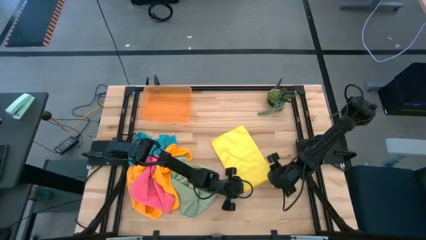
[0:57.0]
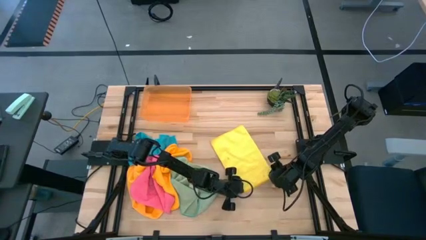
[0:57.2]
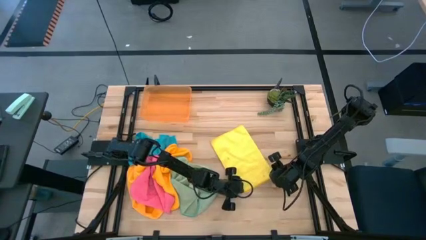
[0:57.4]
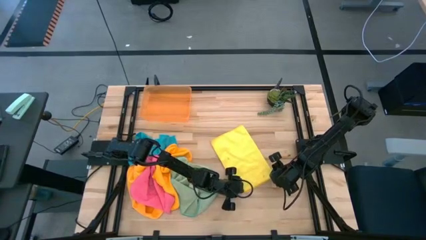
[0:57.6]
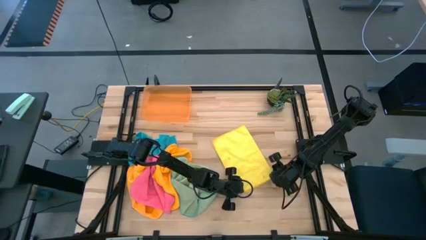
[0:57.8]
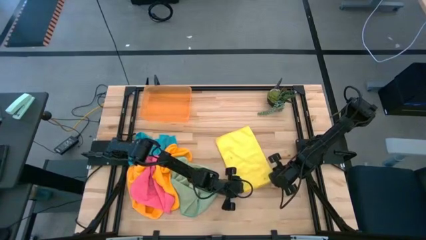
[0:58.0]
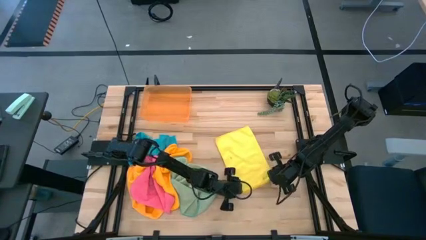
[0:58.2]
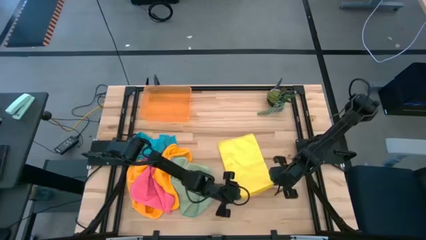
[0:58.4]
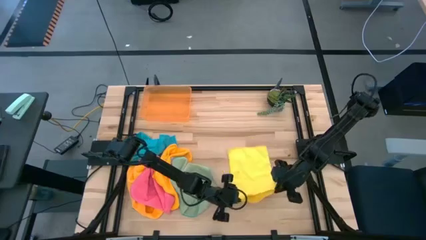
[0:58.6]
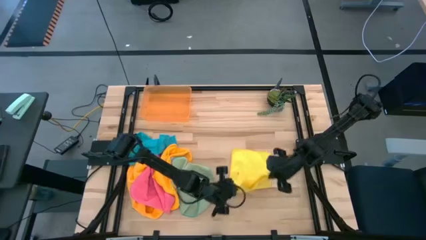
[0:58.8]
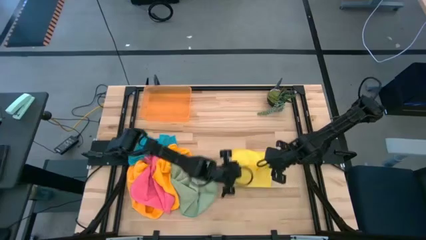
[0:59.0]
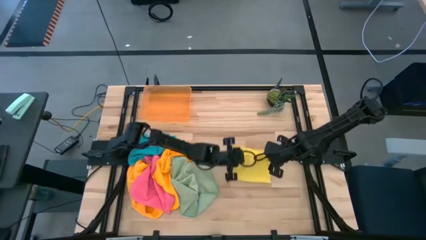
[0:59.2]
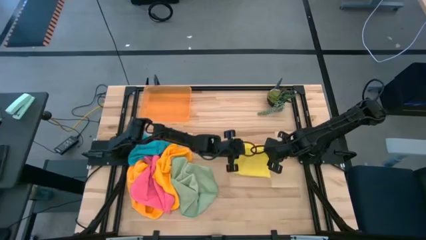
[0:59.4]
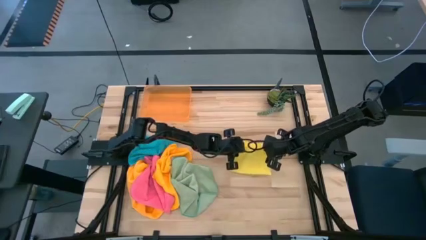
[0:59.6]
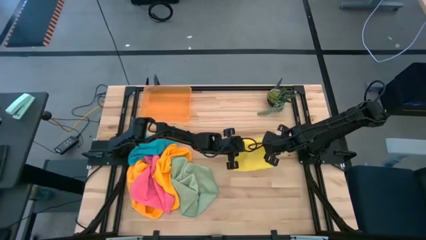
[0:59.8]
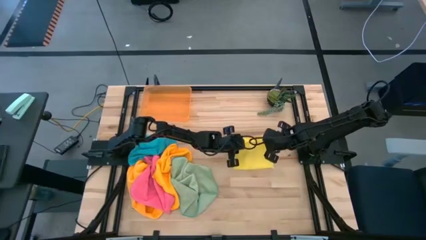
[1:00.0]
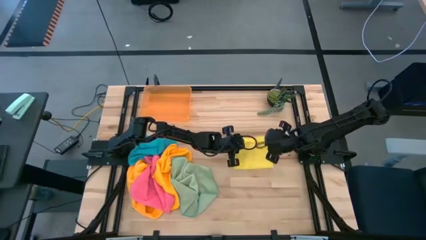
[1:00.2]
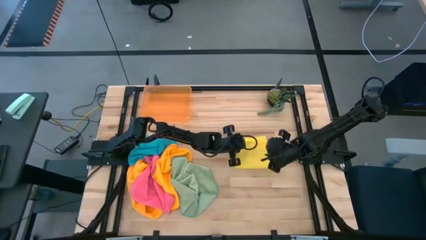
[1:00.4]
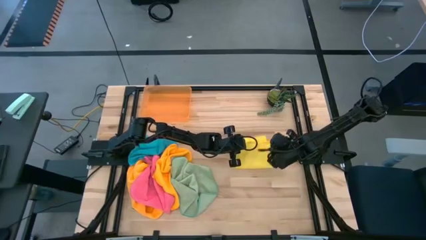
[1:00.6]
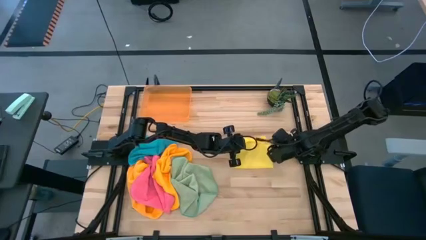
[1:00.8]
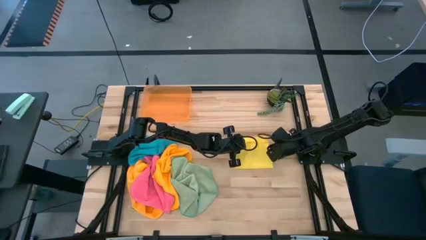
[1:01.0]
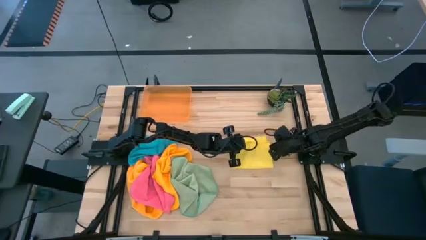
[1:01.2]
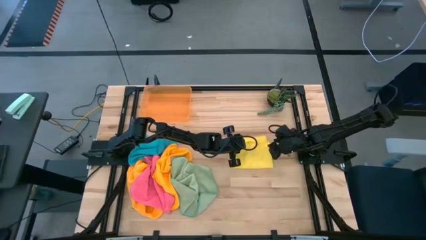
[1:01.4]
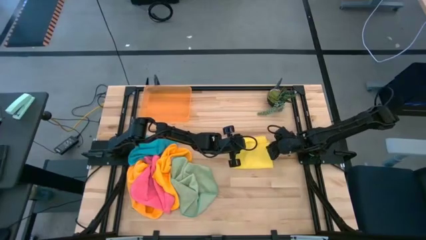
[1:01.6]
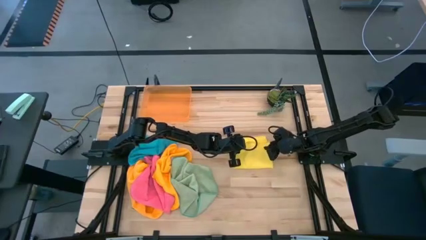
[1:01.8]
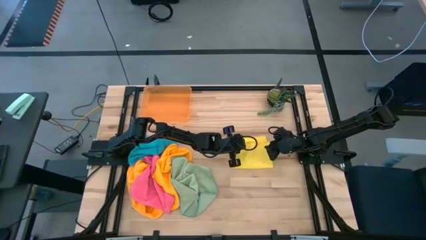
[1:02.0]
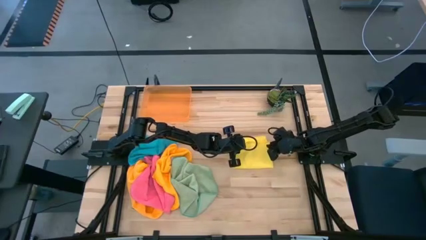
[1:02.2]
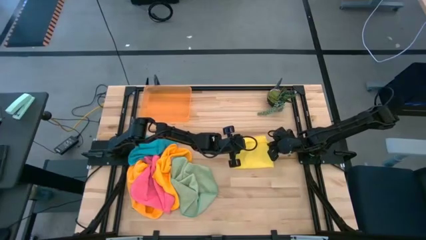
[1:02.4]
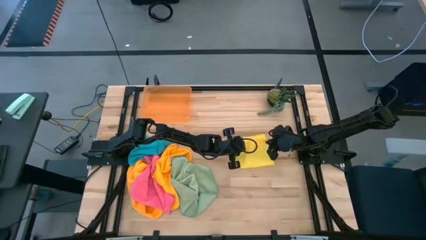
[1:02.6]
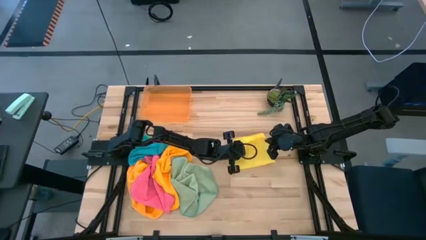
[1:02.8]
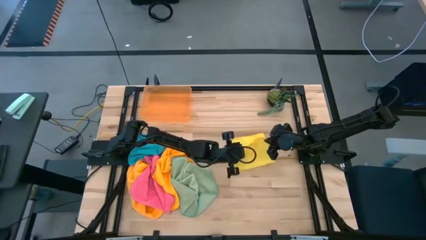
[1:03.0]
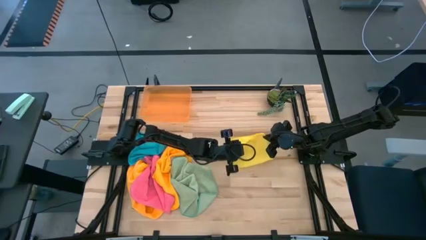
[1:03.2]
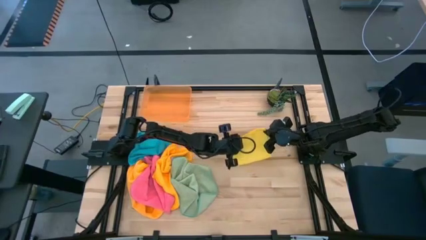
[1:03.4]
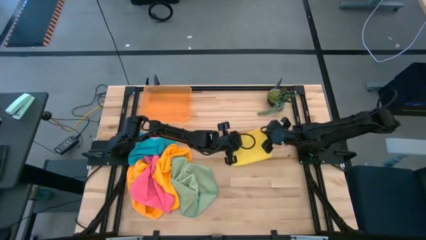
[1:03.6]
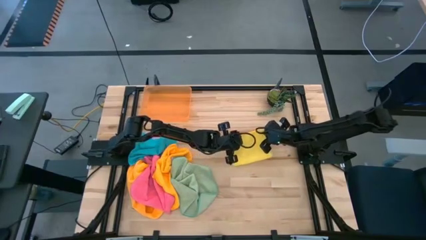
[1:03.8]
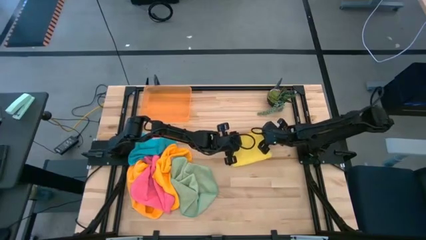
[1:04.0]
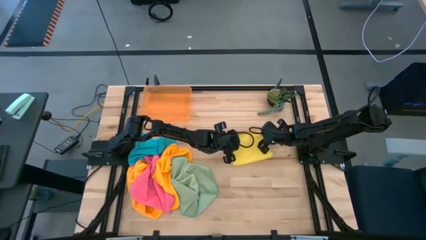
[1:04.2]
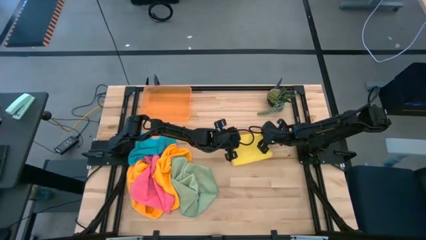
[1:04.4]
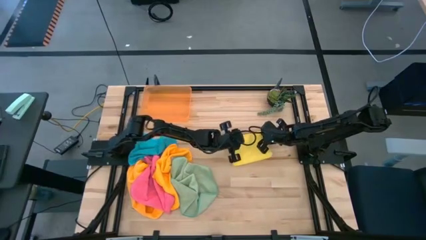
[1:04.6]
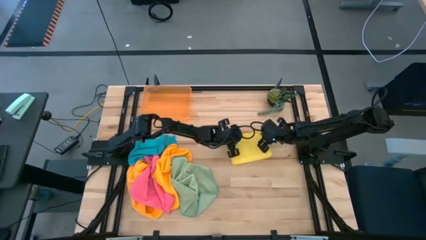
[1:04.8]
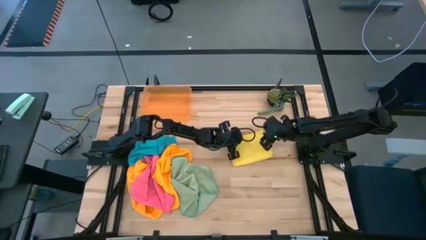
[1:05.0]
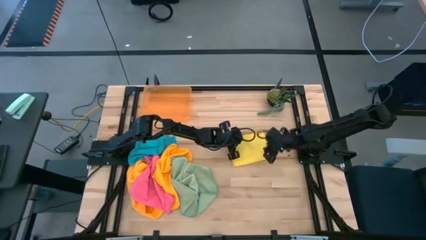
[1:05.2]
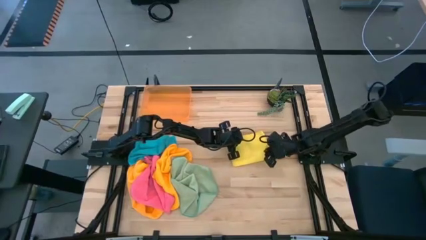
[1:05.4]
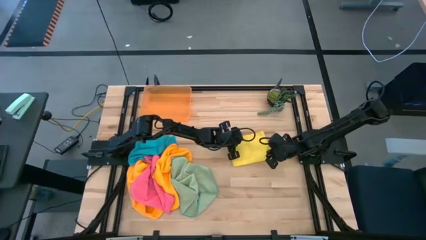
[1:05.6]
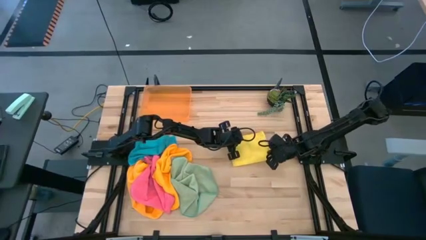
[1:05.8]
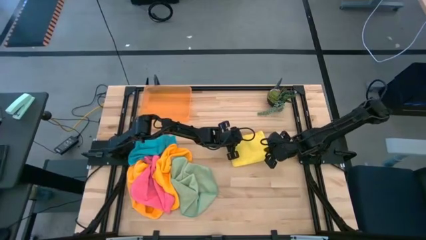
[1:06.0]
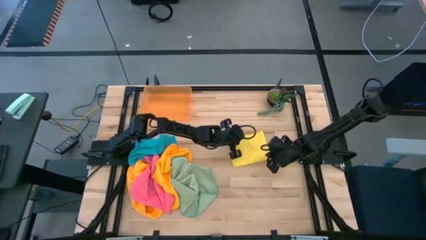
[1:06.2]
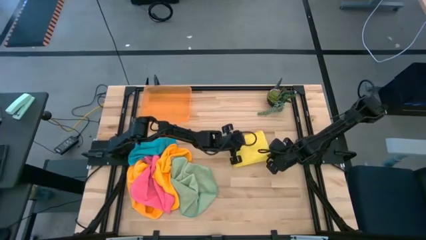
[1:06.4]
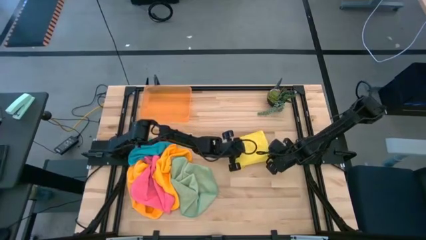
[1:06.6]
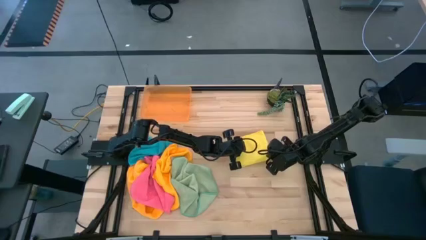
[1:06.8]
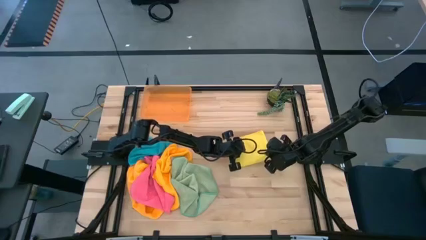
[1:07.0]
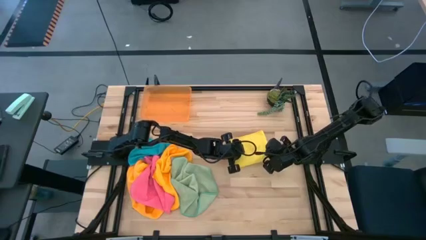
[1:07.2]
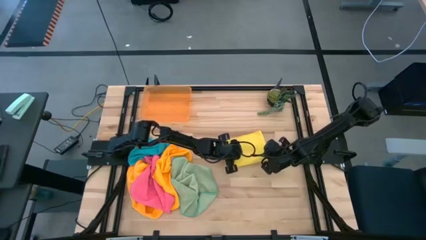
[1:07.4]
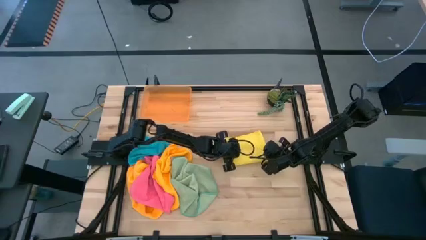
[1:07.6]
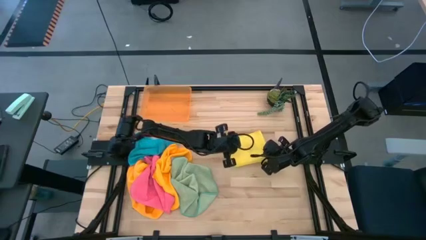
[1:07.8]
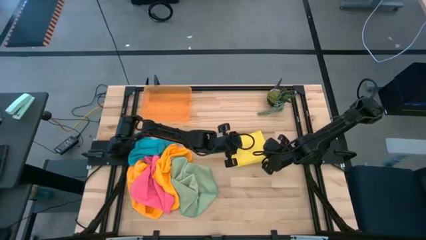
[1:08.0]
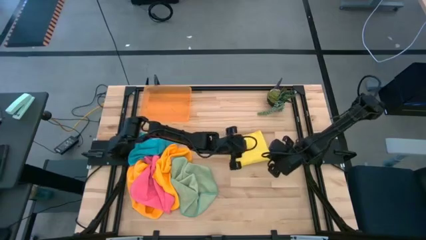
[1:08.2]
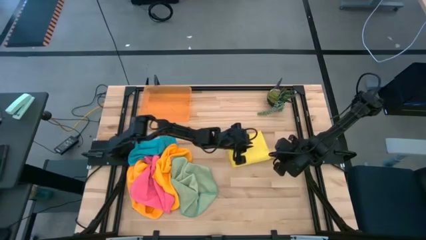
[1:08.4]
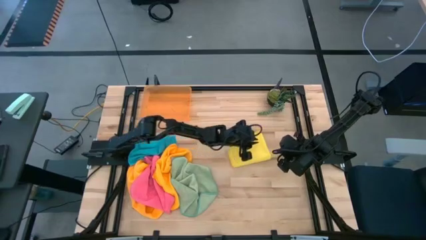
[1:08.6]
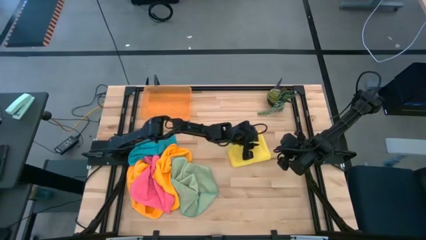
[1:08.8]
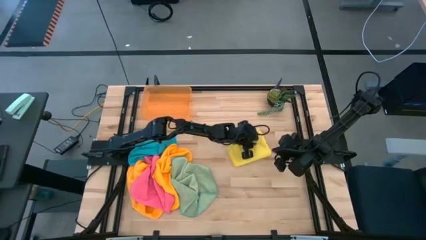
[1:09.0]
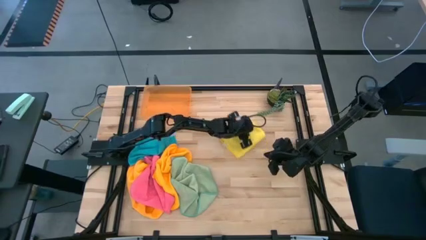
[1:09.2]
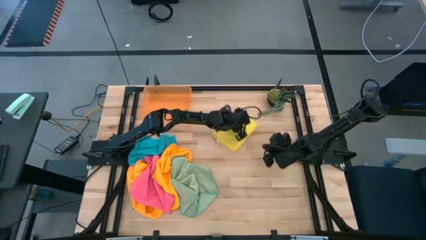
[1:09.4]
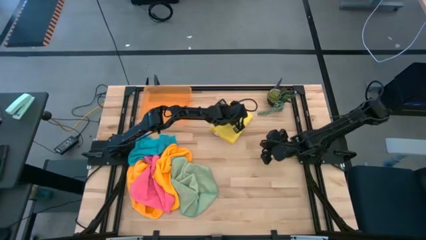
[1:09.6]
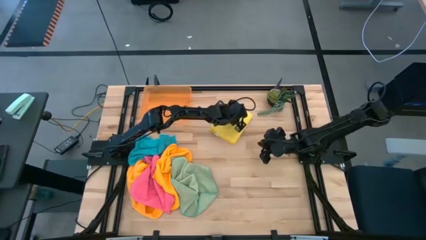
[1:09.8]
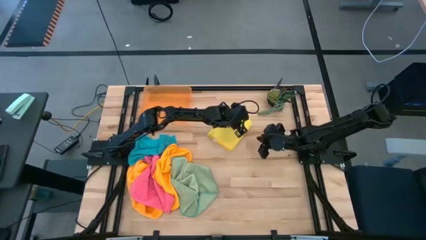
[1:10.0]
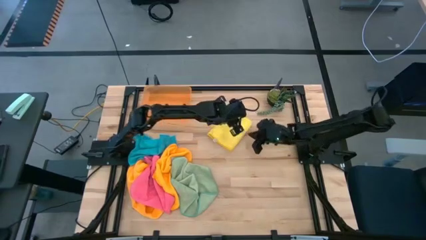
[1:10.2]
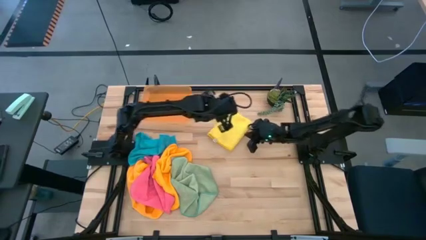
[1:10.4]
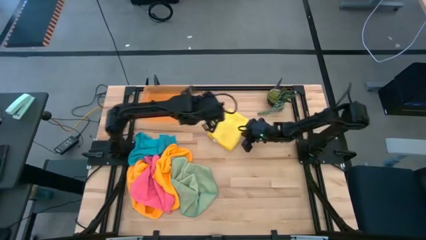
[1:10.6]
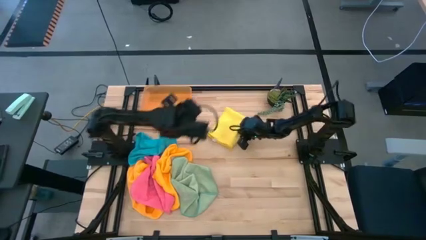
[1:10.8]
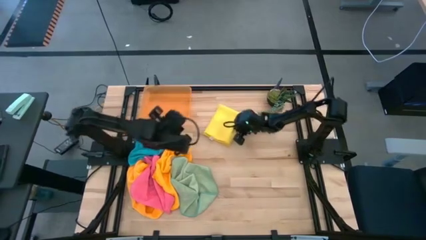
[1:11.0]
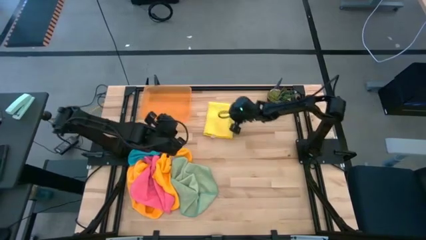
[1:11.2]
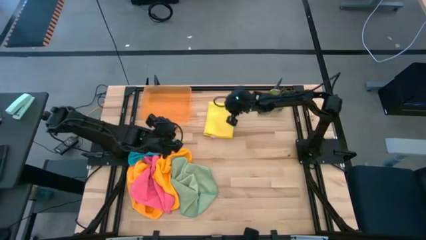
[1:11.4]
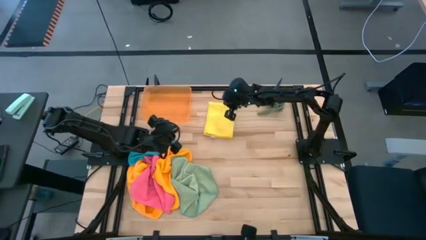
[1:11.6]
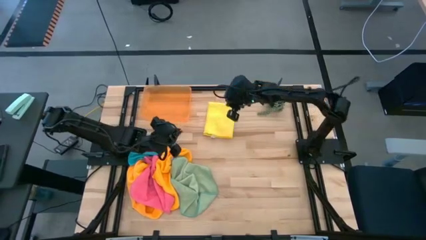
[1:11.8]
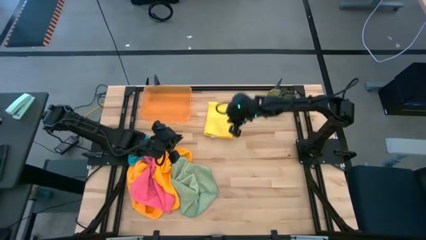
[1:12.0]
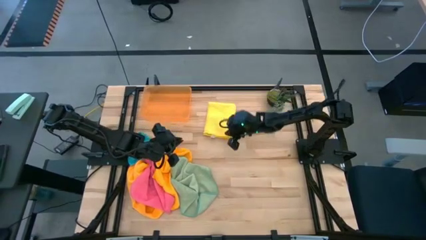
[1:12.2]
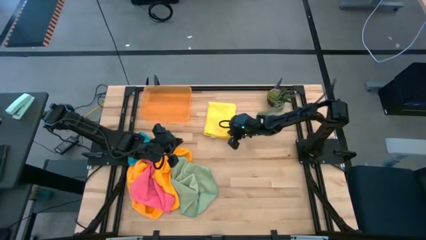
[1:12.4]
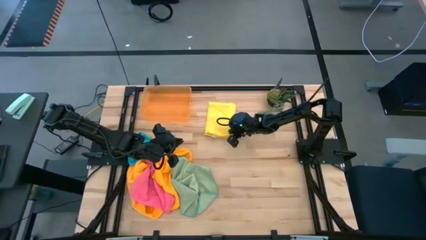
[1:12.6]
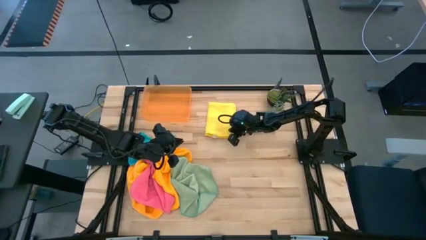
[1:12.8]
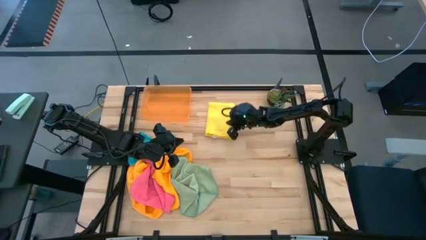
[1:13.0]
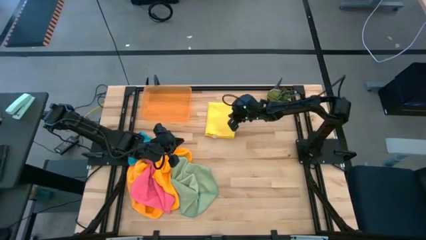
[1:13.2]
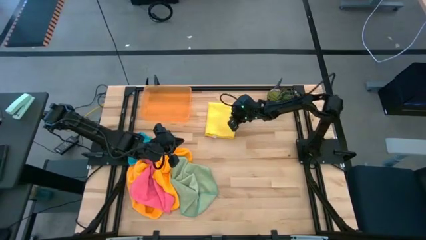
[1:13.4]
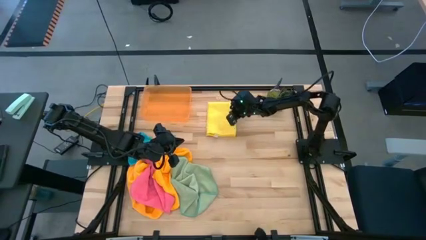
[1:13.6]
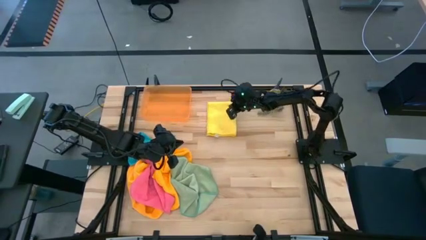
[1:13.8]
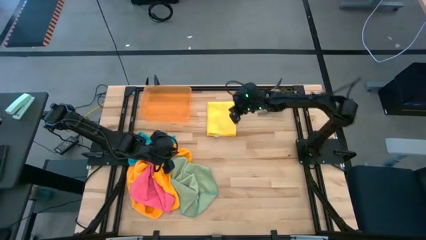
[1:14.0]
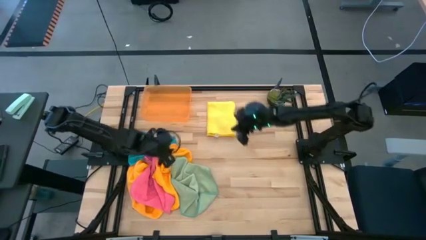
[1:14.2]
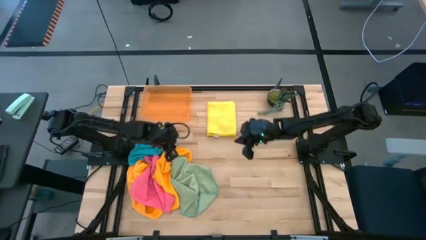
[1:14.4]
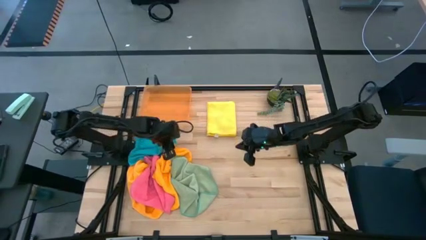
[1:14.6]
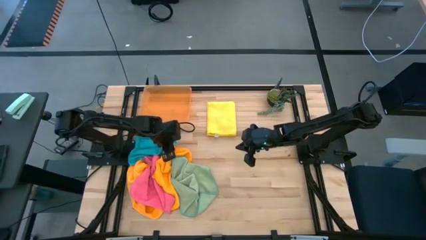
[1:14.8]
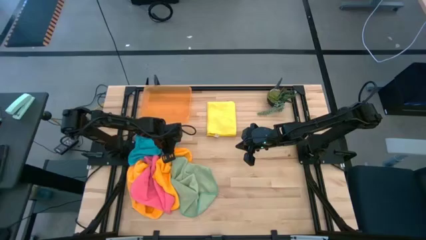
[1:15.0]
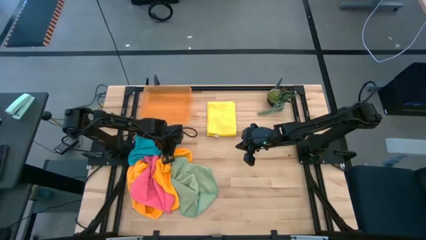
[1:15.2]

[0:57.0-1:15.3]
Task: Fold microfiber towels
Fold the yellow towel
